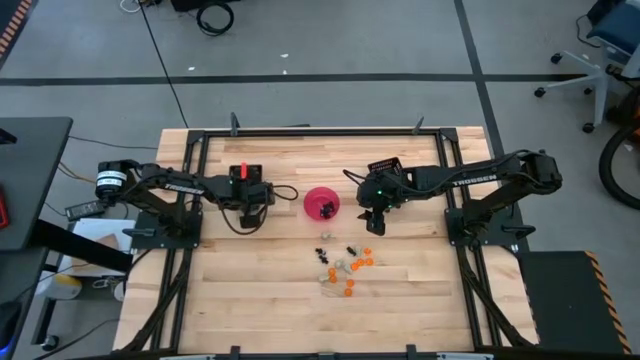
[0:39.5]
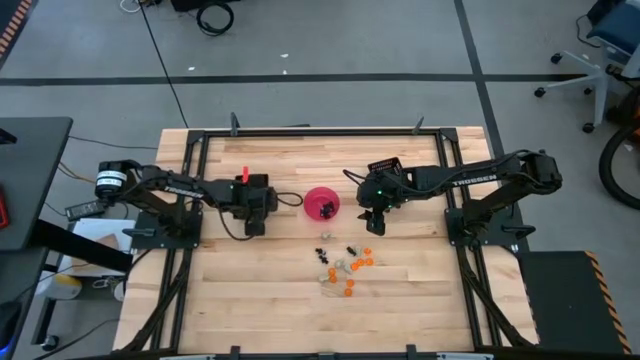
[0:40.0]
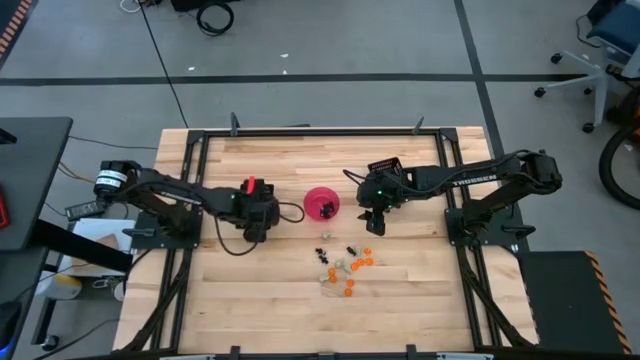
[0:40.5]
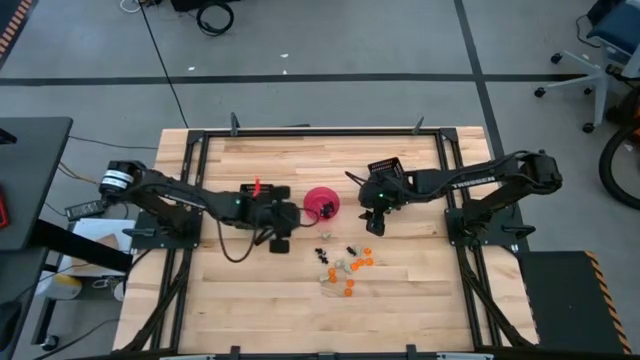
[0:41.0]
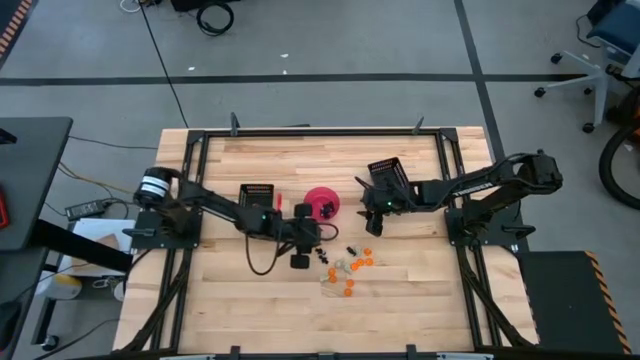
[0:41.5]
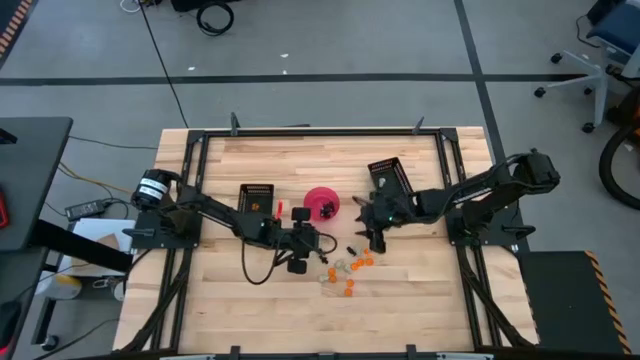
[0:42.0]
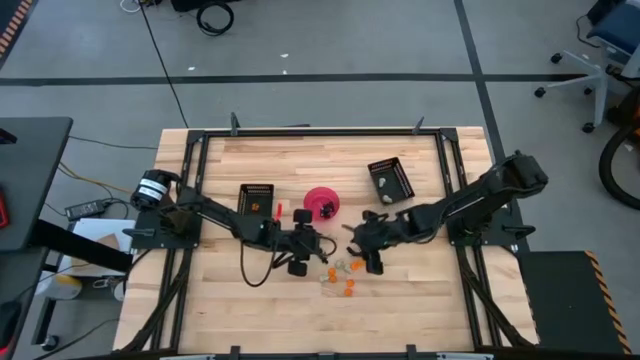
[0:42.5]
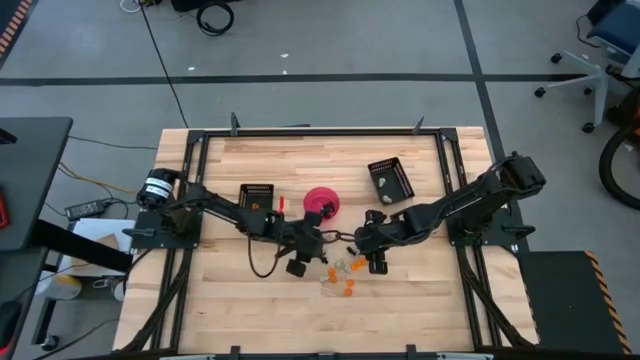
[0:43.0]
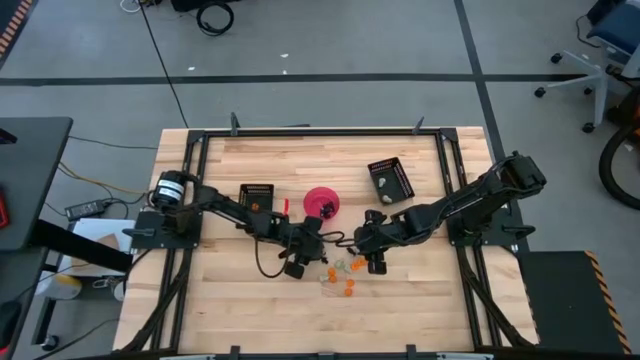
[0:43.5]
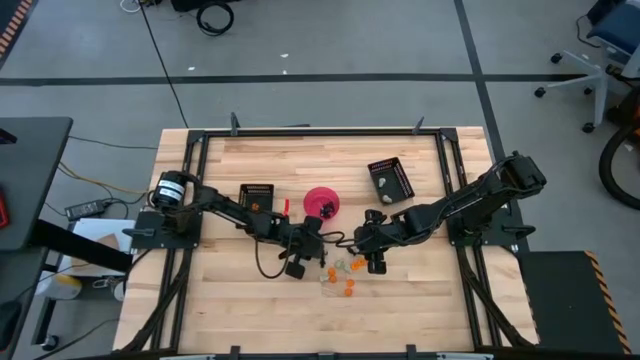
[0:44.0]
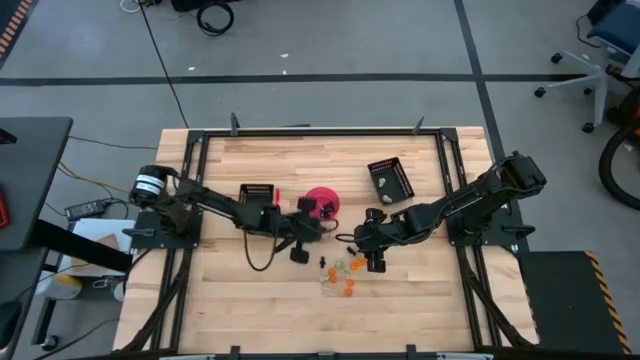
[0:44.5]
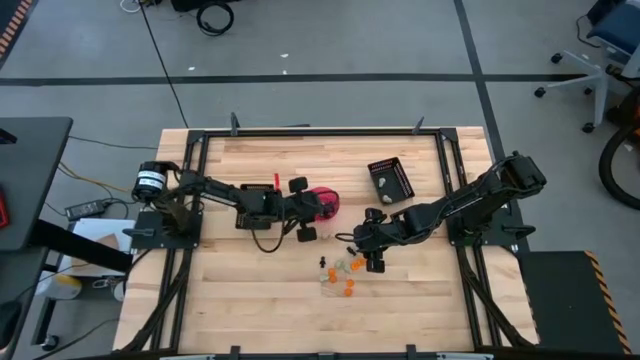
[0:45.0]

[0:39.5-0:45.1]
Task: Sort Halloween decoration
Put the left black skeleton toy into the pink bin

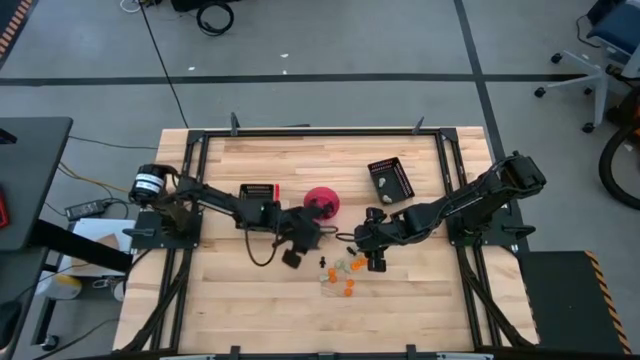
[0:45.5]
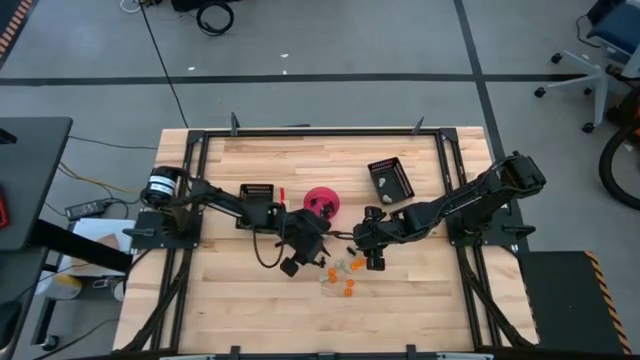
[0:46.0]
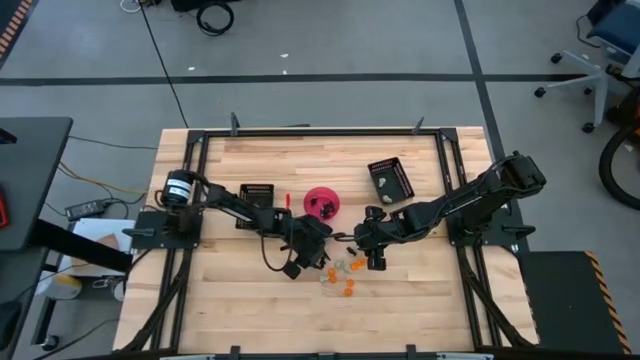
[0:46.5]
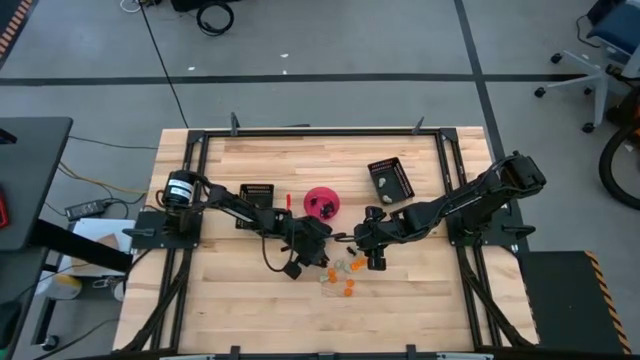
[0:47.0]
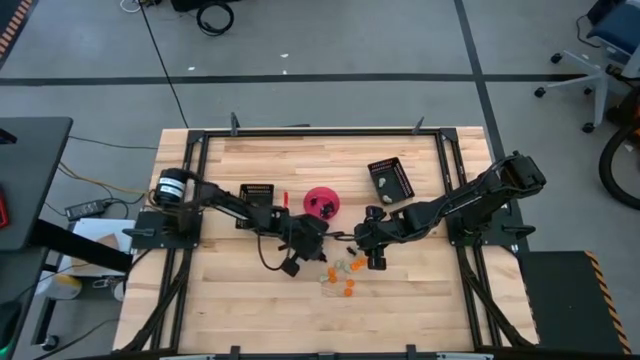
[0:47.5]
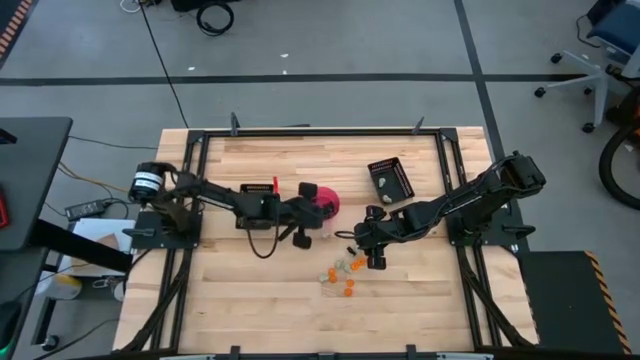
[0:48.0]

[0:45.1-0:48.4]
Put the left black skeleton toy into the pink bin

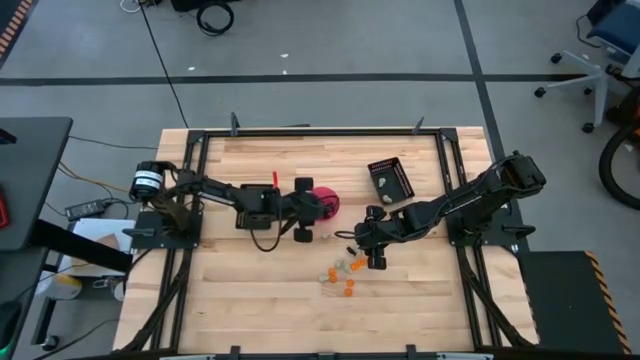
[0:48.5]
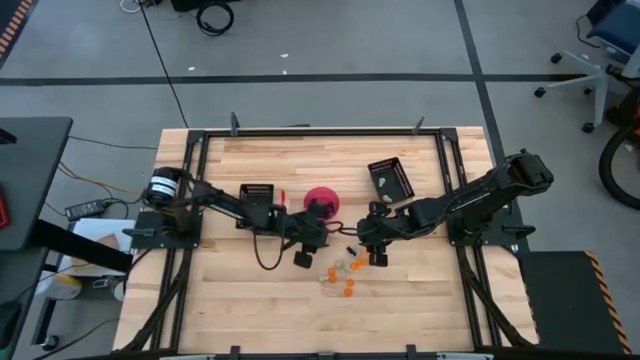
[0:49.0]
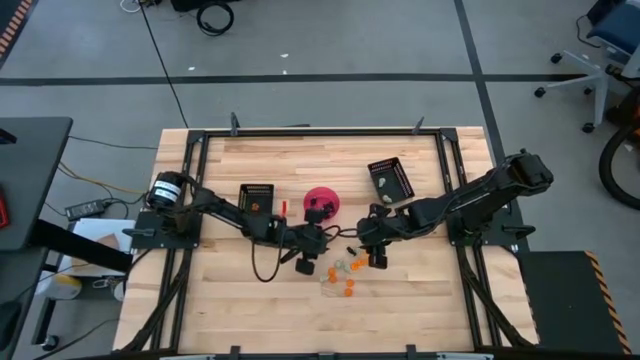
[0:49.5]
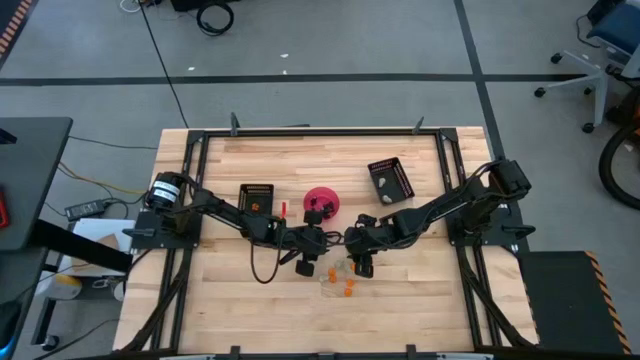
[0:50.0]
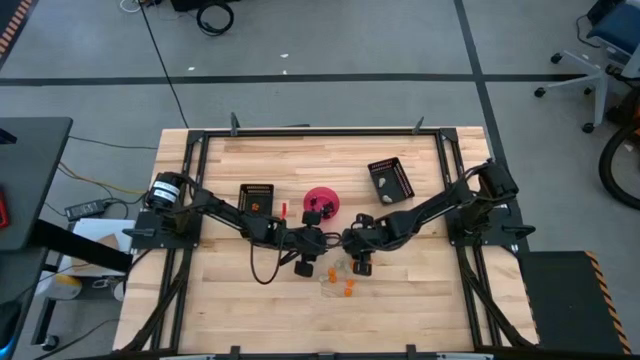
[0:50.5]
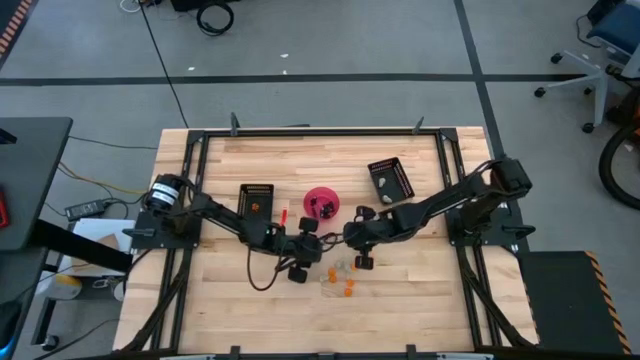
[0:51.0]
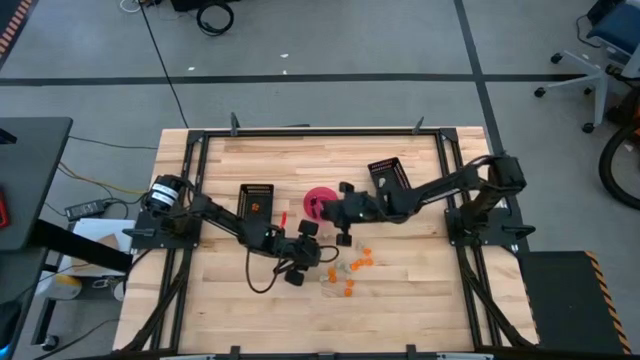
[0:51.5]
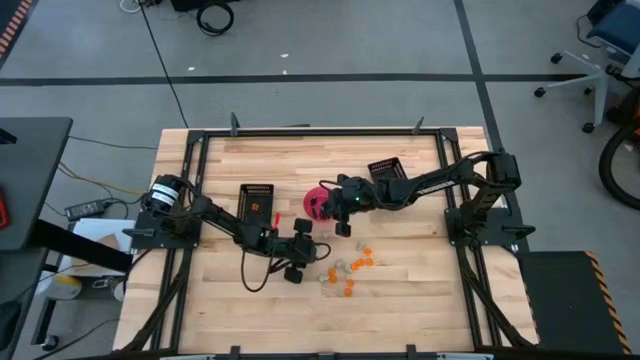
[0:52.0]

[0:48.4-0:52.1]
Put the black skull toy into the pink bin

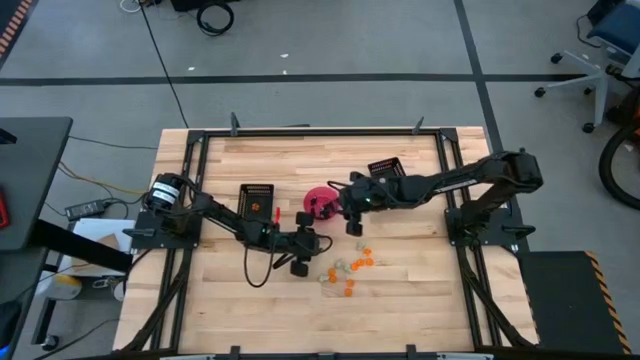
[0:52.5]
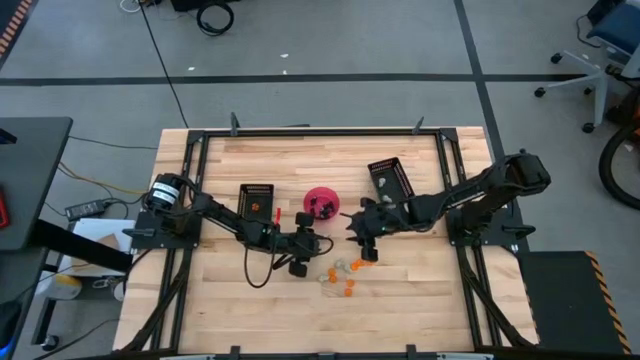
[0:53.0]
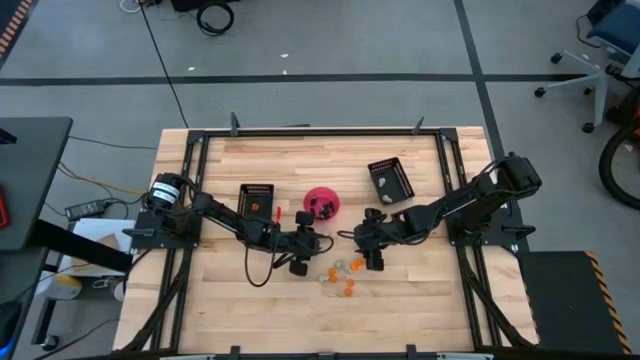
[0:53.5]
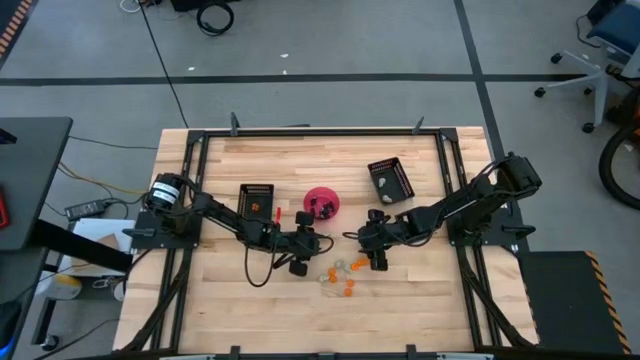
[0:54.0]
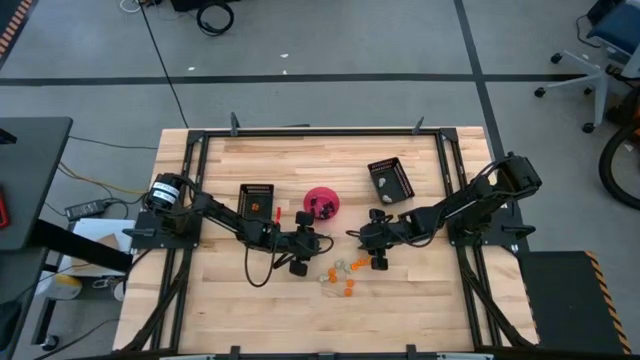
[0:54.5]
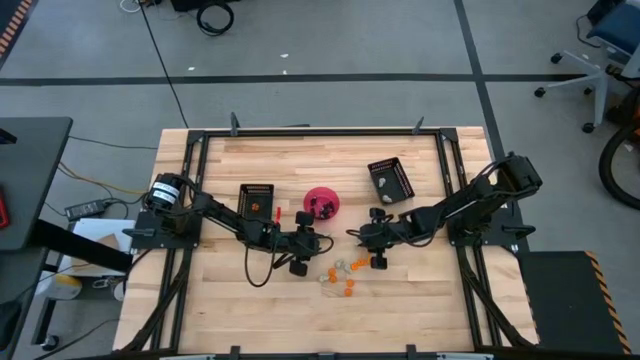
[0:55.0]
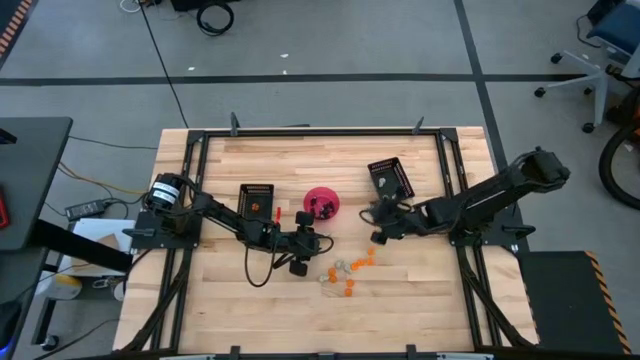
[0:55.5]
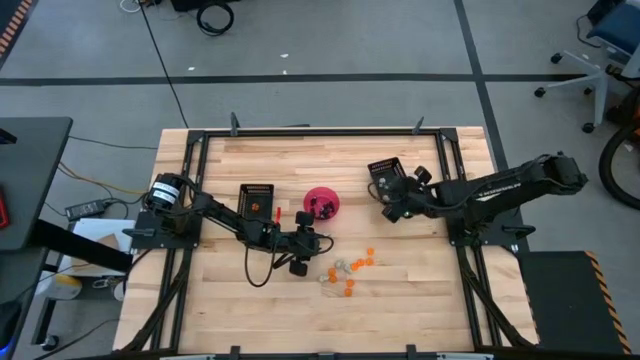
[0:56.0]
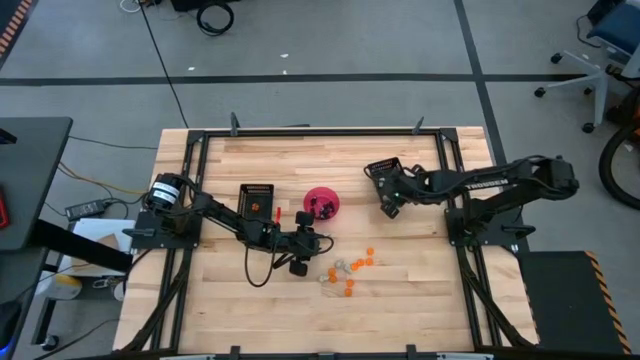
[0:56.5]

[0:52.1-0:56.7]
Put the white skull toy into the right black bin

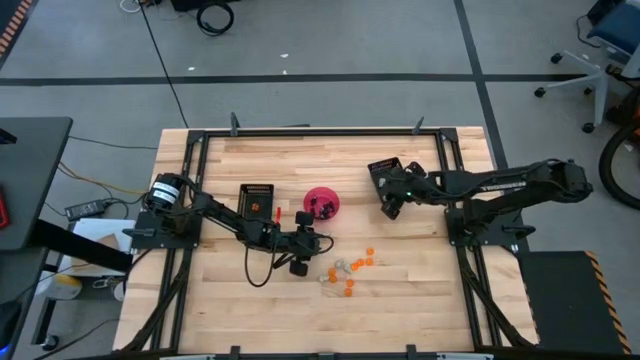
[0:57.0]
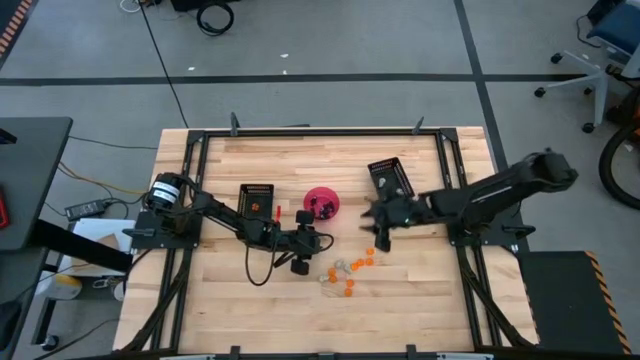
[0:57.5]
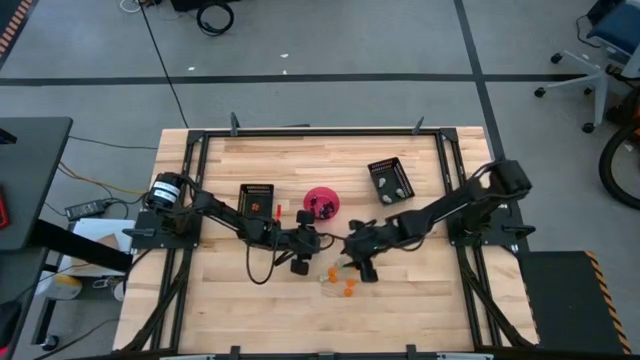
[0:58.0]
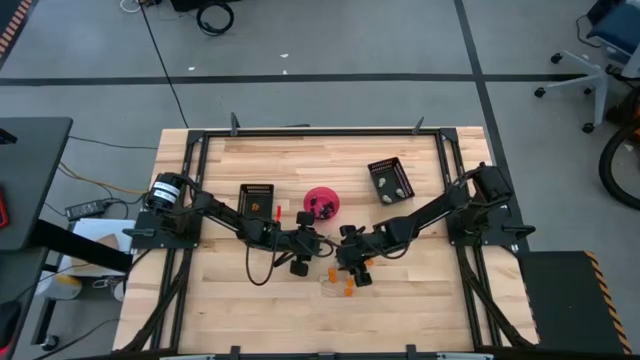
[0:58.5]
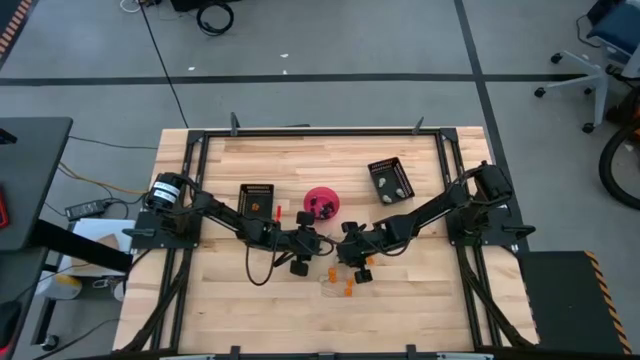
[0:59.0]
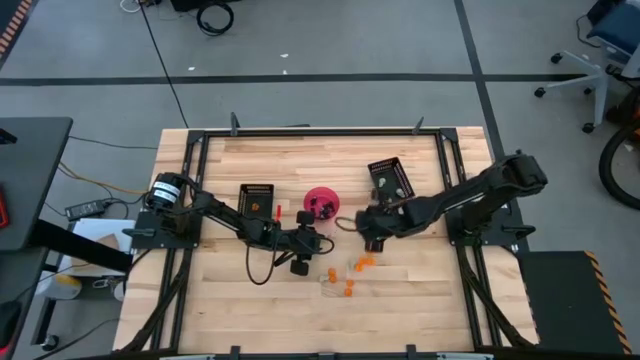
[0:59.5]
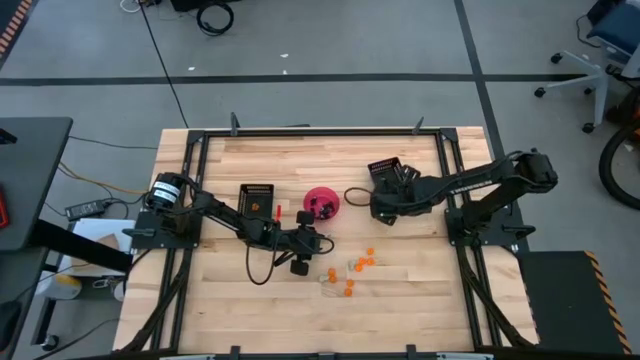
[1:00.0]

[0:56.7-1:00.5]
Put the right white skull toy into the right black bin

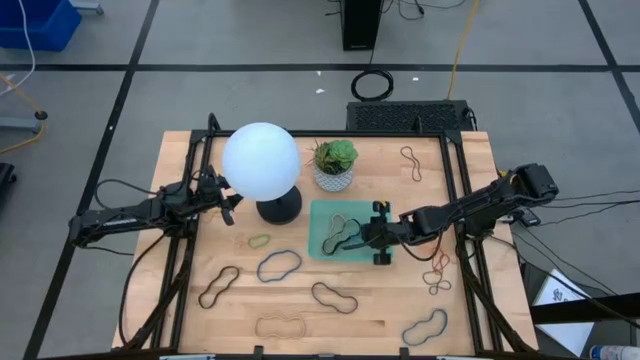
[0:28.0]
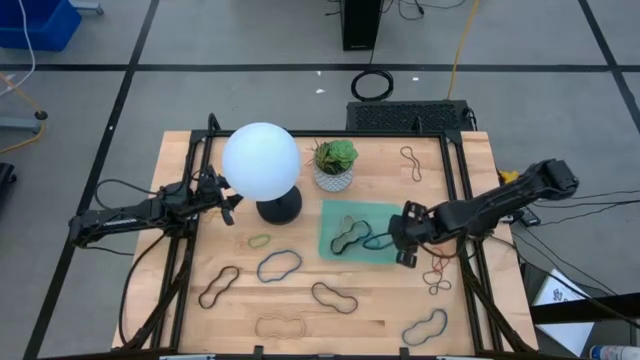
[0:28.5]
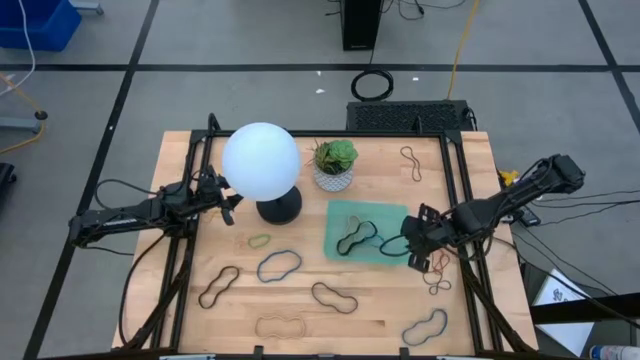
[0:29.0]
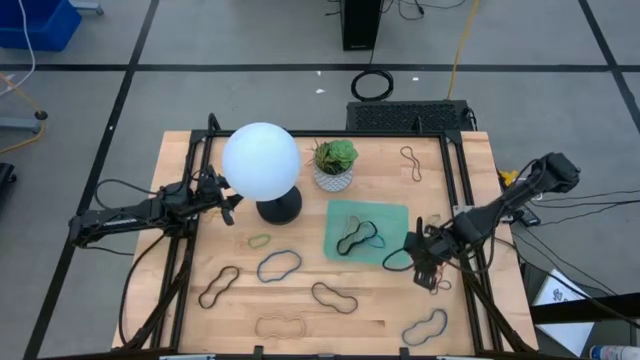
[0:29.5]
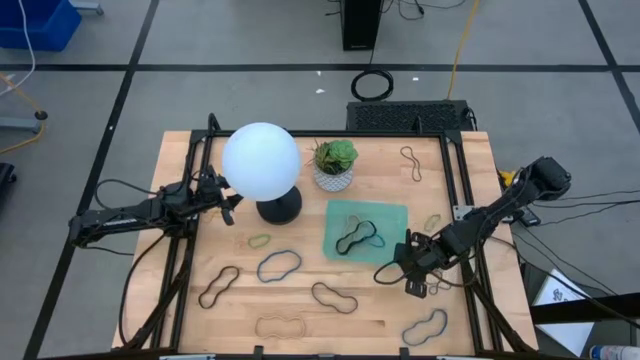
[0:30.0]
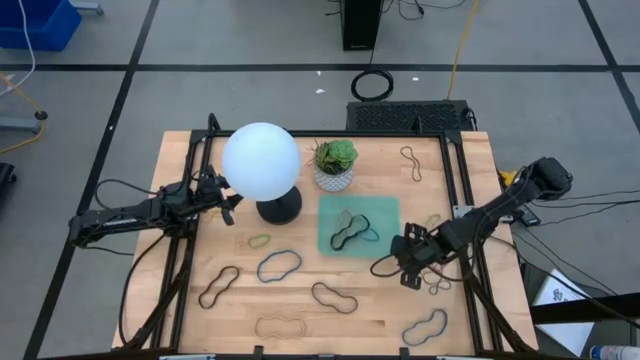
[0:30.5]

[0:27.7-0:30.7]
Task: Pick and place rubber bands into bin
Adjust the blue bin
